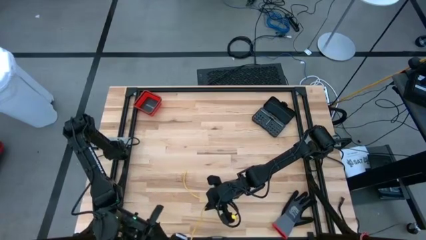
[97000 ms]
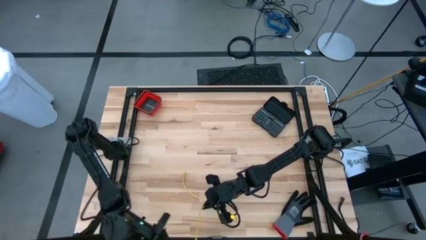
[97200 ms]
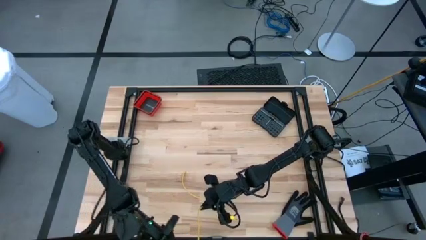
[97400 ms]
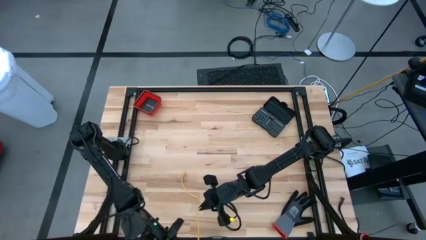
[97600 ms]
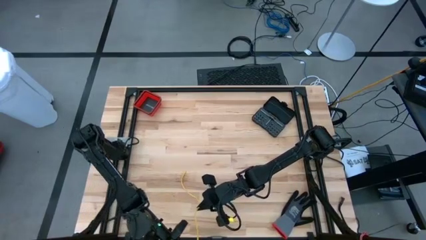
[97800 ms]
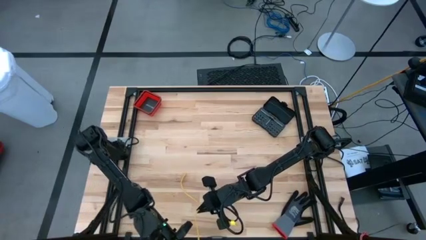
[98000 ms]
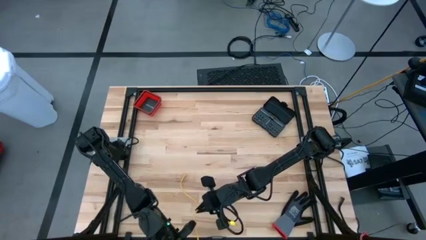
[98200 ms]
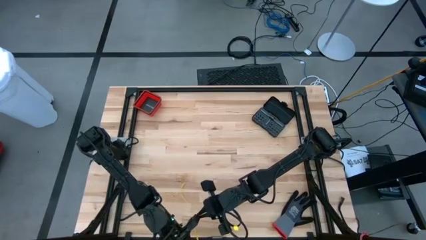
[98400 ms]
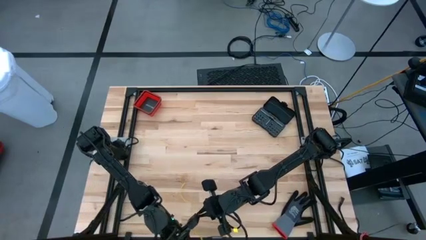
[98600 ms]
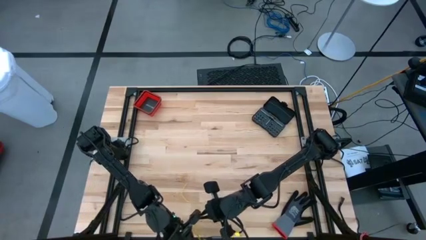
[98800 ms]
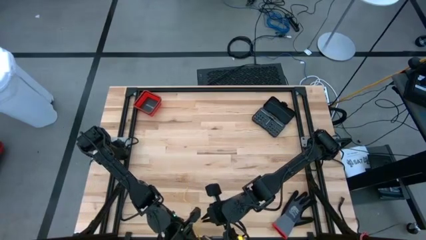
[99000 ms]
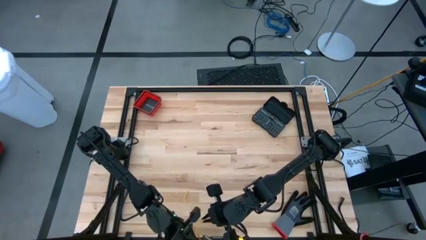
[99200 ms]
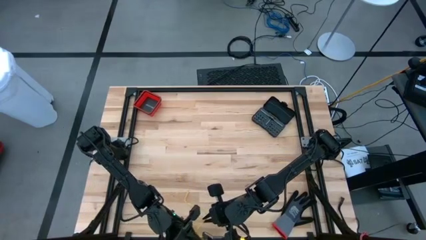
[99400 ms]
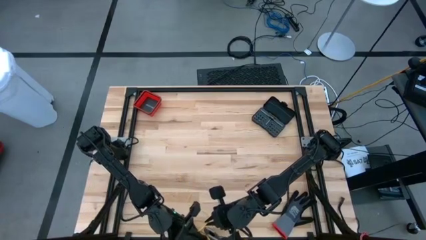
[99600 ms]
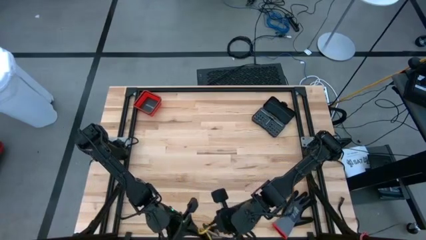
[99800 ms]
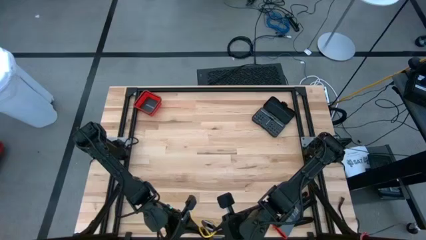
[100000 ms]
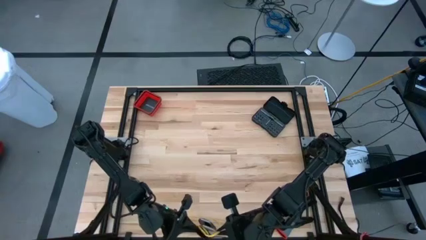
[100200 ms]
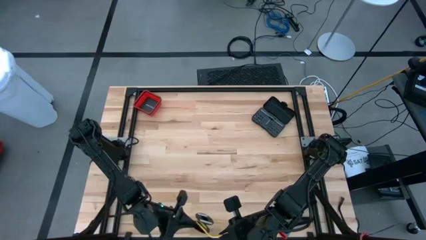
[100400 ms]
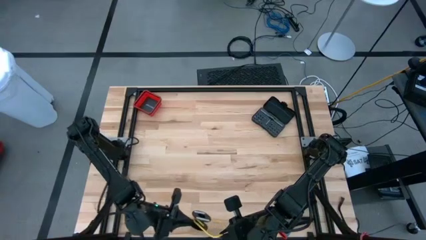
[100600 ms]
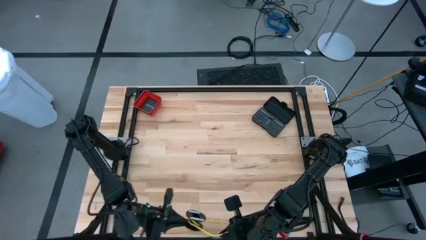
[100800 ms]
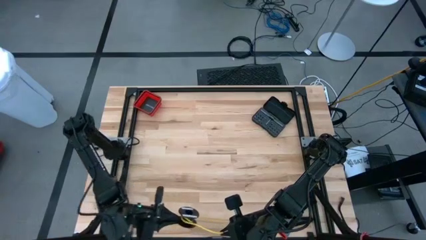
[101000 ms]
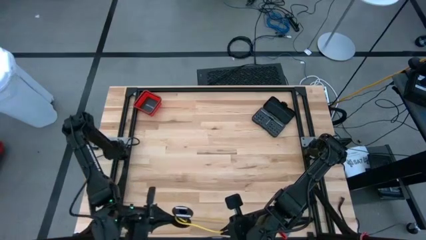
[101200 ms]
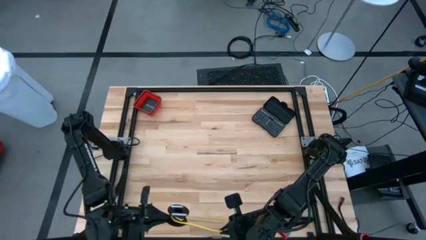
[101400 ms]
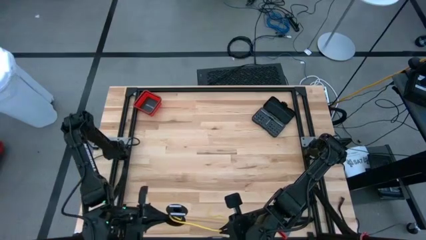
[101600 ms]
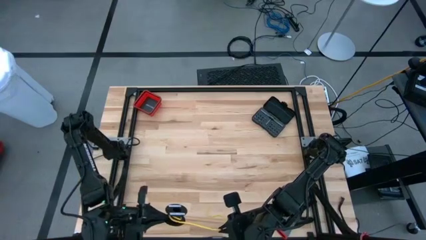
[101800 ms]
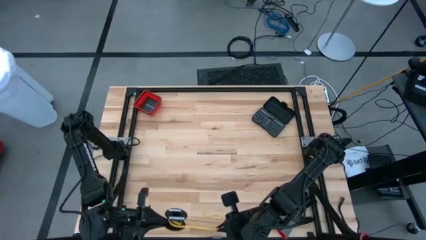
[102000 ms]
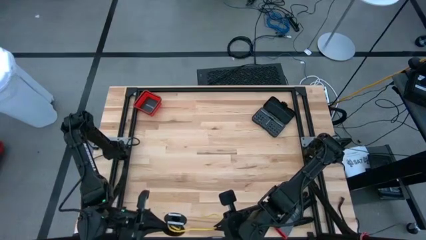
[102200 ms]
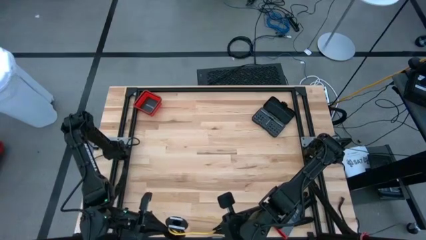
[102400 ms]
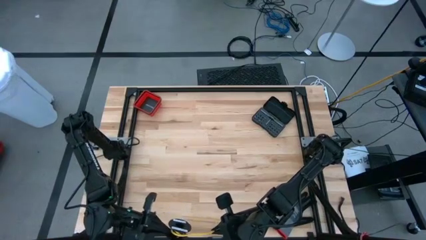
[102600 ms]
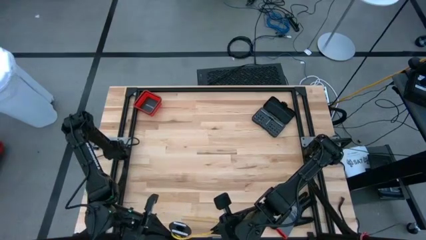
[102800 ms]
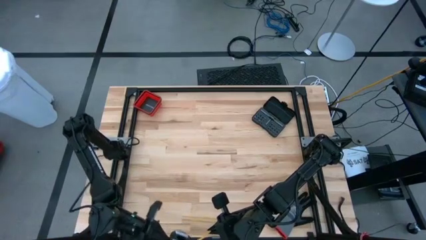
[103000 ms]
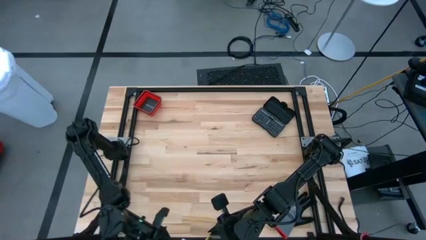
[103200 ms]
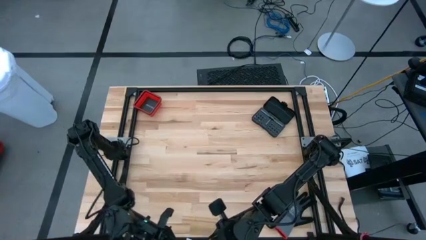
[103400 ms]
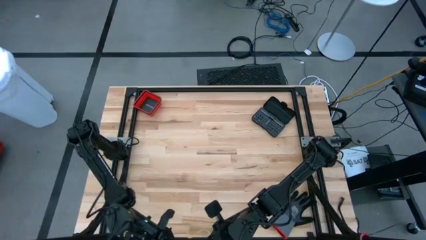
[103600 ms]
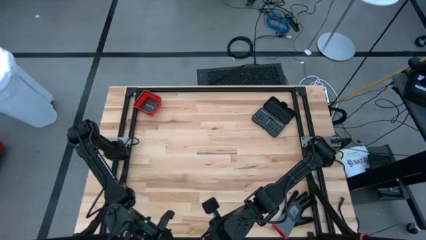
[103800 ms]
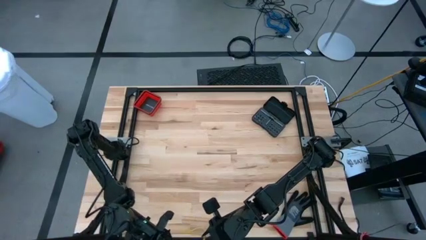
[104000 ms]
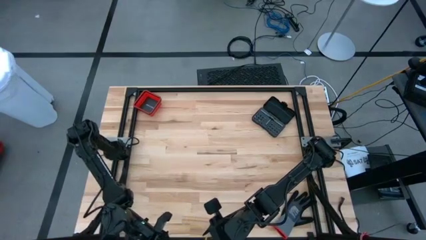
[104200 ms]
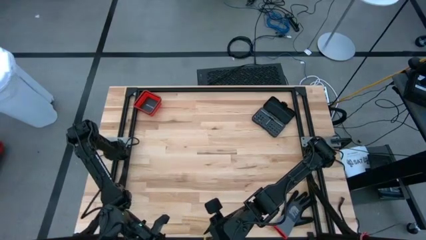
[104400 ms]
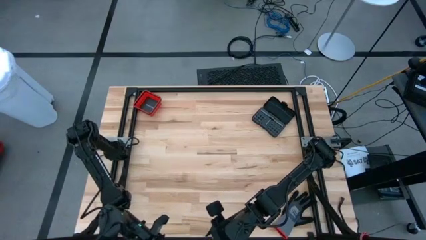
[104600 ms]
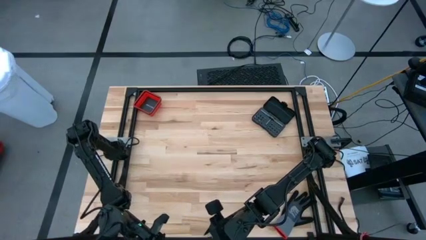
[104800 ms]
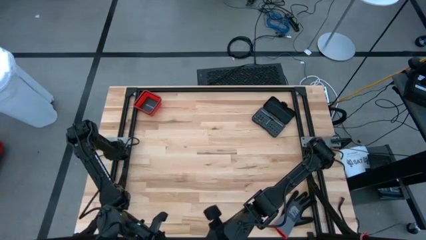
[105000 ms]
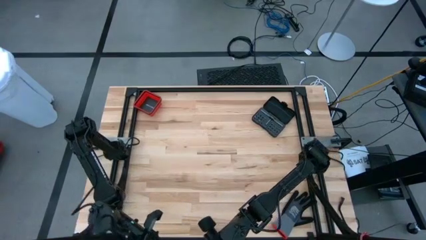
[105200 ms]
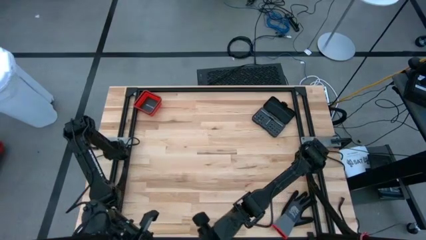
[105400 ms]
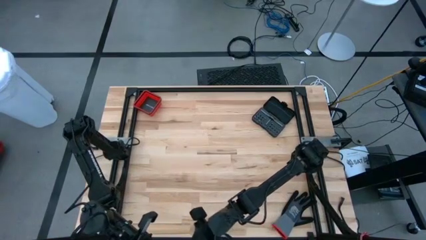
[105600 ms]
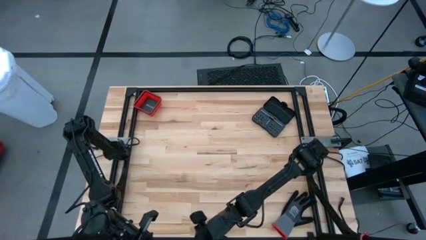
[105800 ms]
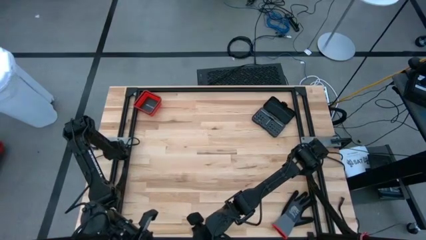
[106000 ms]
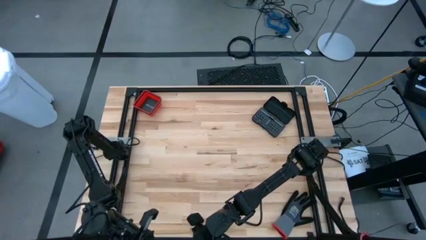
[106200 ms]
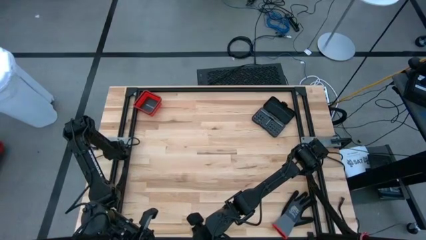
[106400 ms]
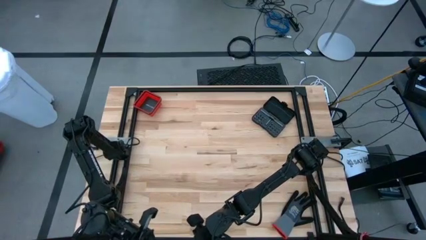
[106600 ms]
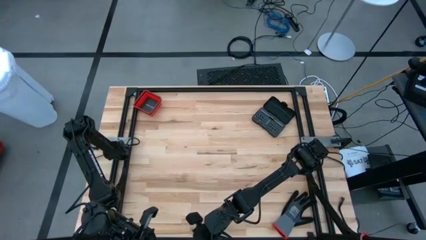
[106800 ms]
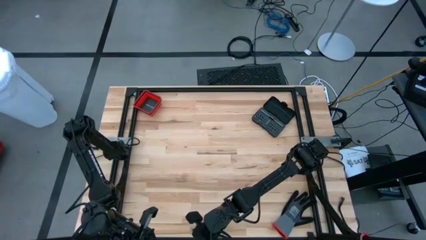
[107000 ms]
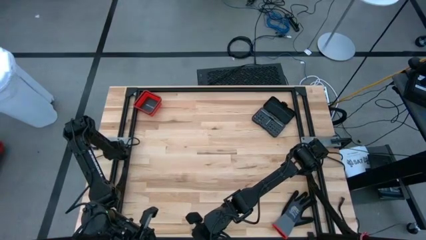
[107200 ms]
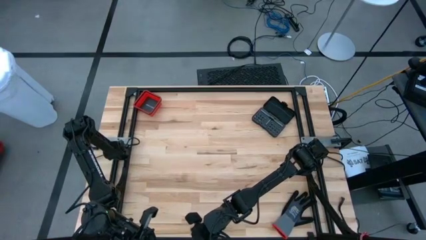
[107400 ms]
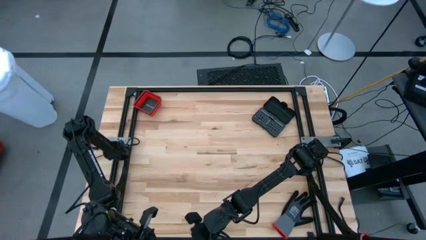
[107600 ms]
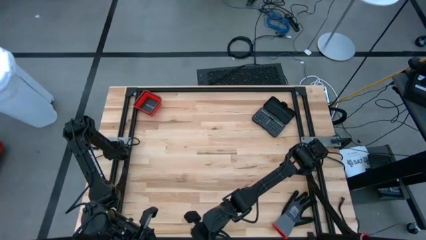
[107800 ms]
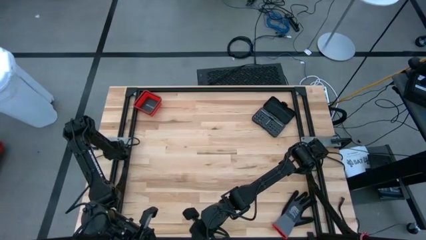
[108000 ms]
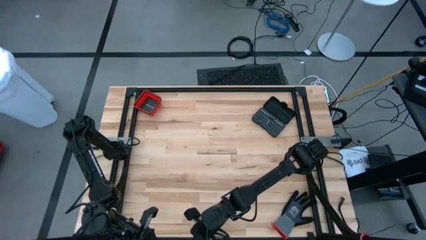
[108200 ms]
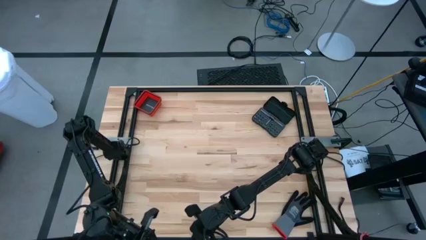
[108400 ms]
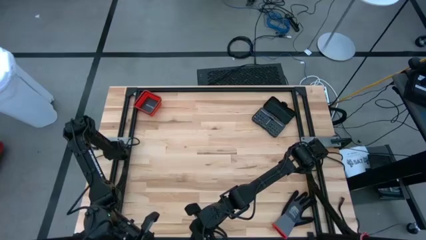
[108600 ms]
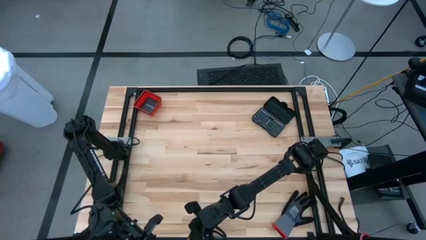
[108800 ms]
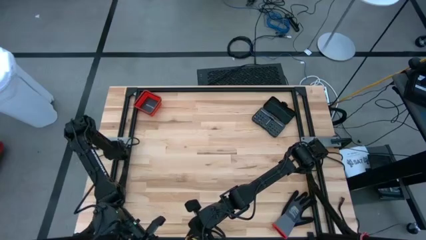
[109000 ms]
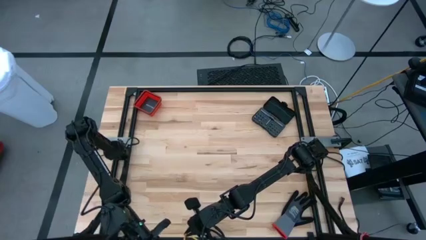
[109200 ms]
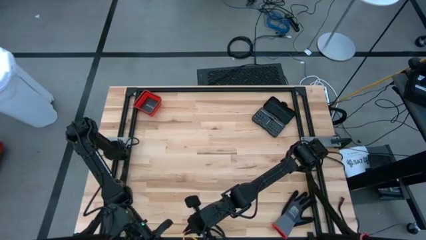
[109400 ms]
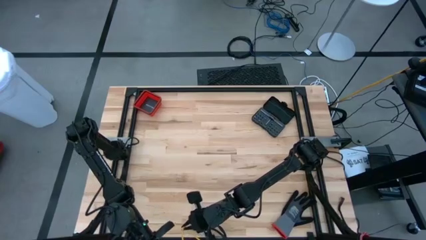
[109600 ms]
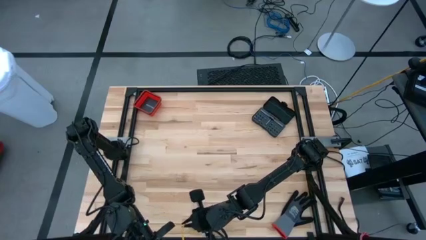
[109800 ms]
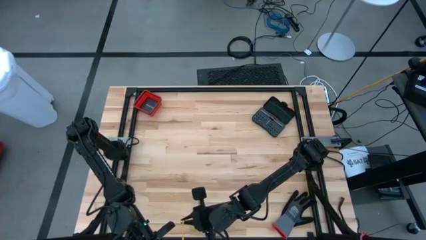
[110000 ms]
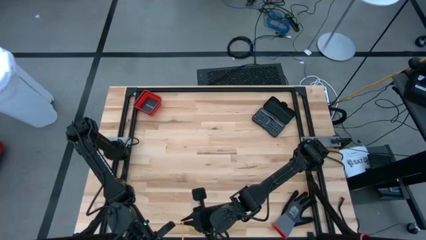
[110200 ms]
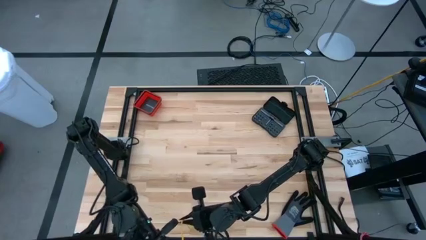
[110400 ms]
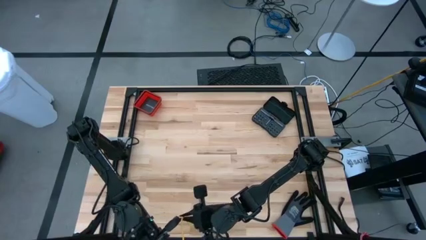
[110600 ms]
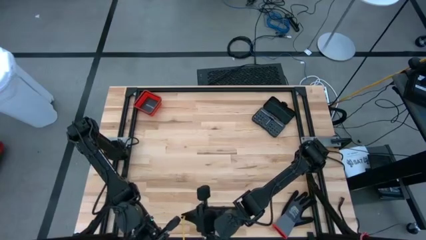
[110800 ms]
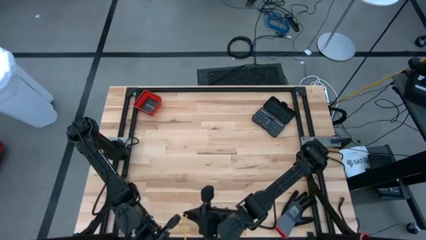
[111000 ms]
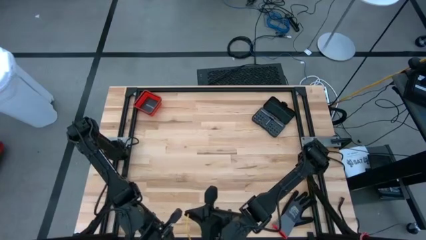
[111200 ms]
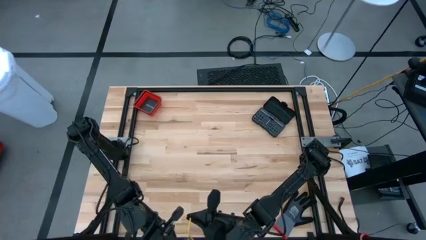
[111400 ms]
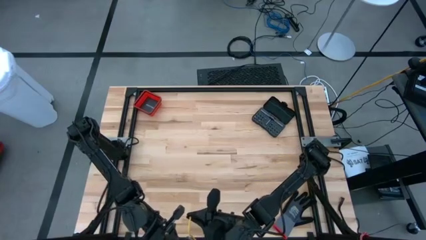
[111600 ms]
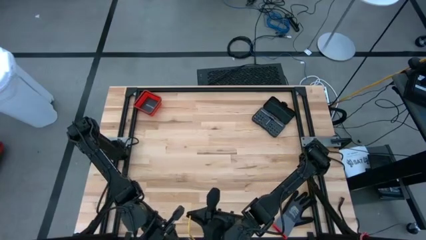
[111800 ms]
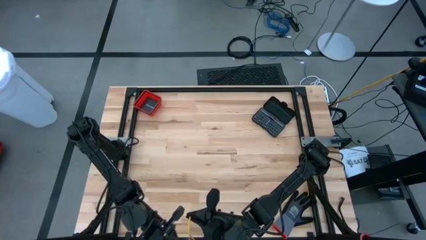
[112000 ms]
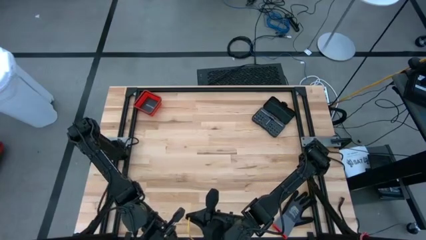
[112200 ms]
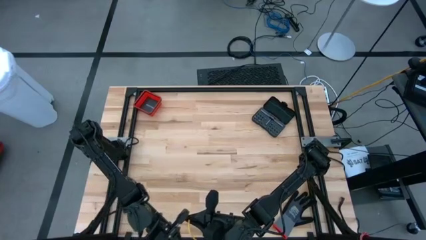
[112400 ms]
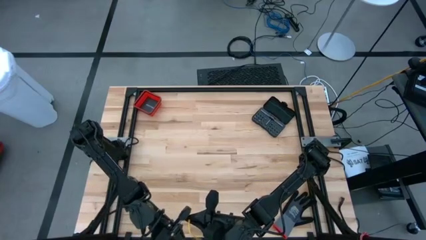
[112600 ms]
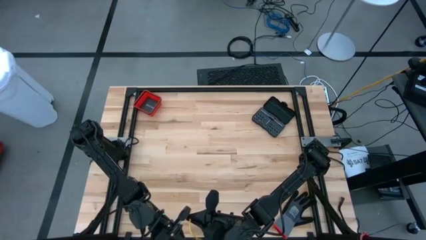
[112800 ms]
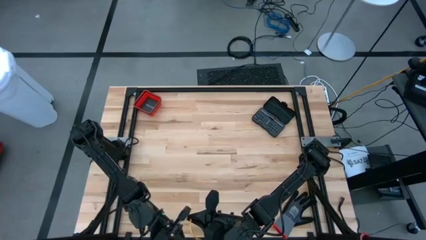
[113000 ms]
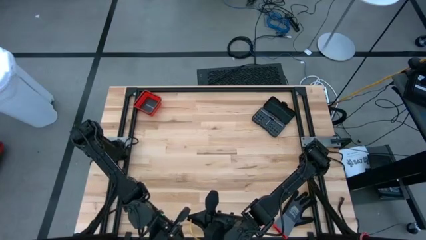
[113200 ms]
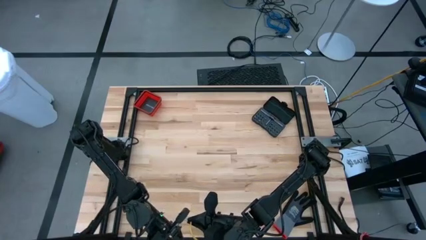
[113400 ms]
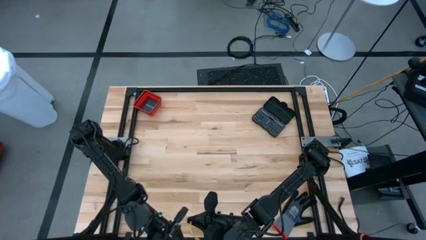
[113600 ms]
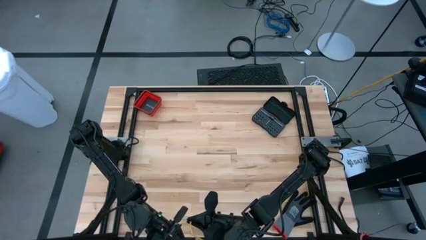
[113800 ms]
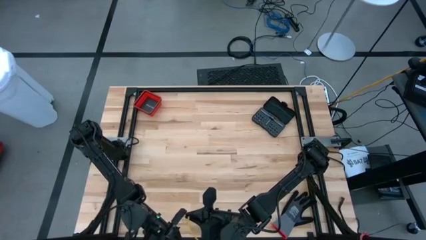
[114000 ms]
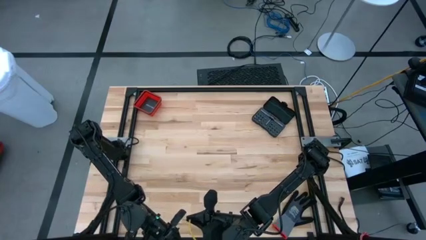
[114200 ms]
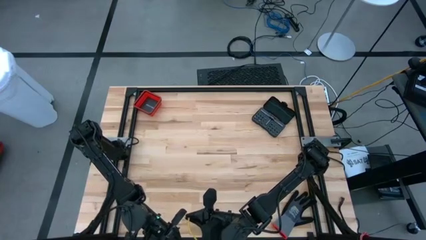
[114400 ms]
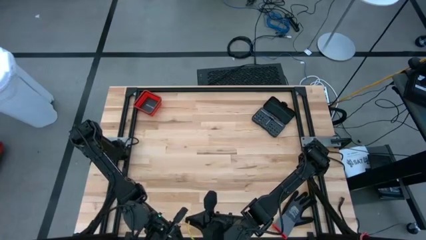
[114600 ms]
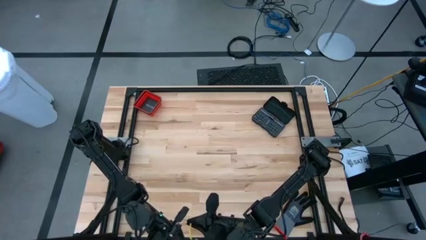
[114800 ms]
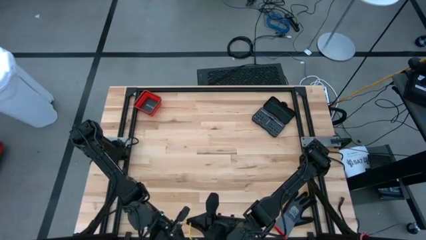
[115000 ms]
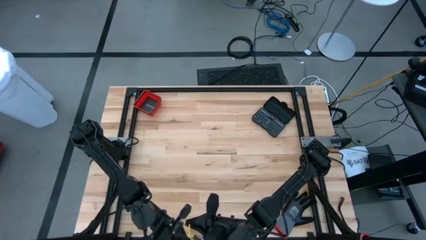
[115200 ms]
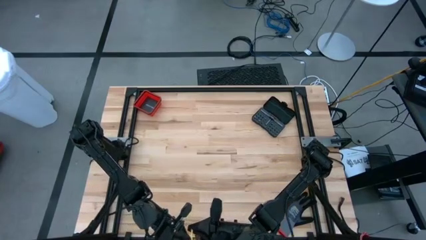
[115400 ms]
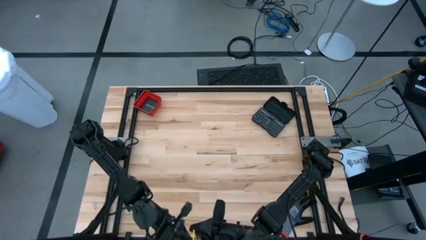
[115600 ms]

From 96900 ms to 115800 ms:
Task: Coil cords
Coil the yellow cable wire onto the spool
